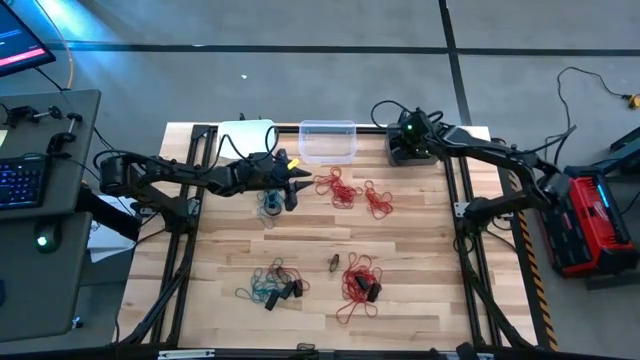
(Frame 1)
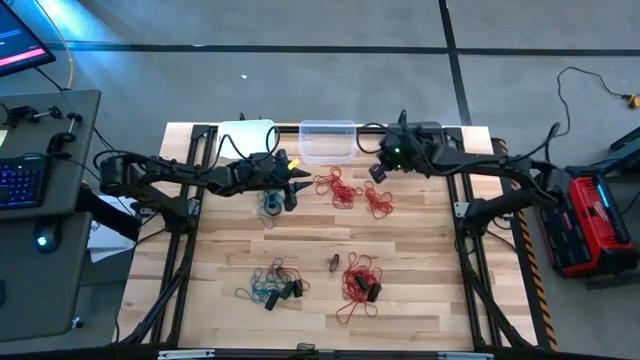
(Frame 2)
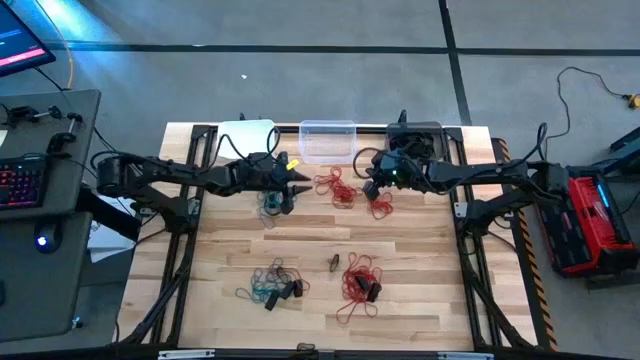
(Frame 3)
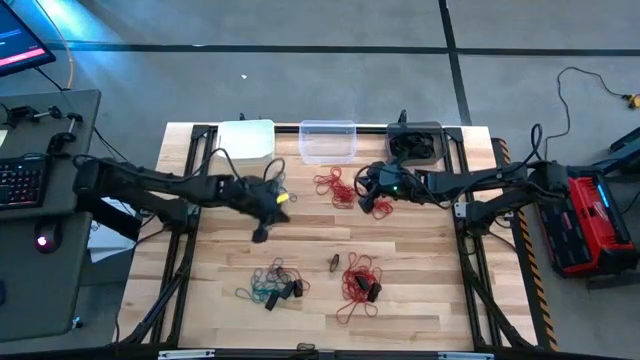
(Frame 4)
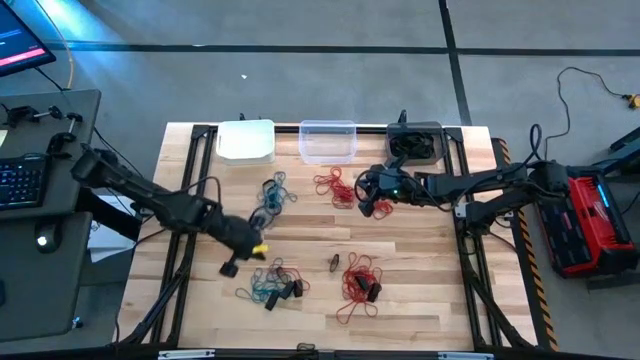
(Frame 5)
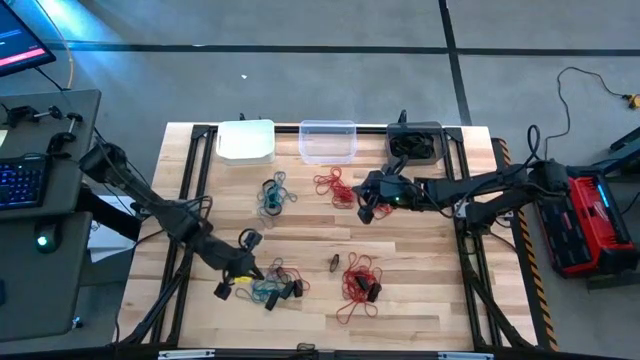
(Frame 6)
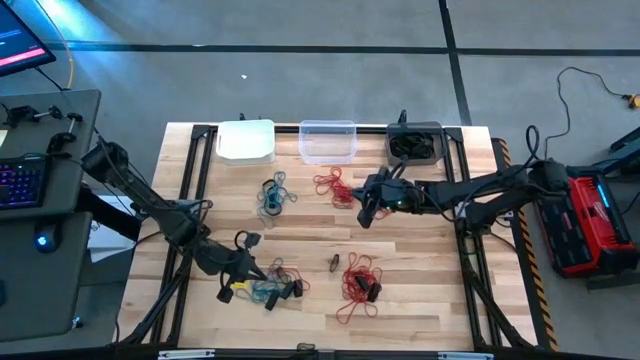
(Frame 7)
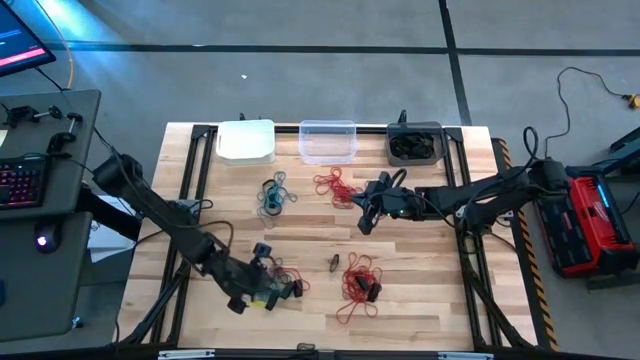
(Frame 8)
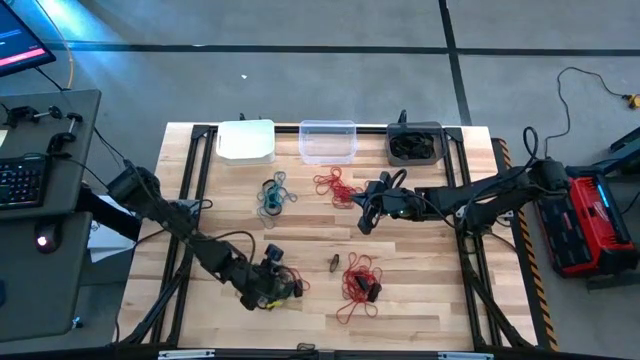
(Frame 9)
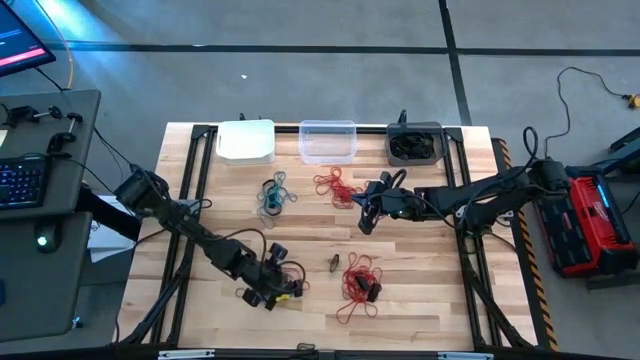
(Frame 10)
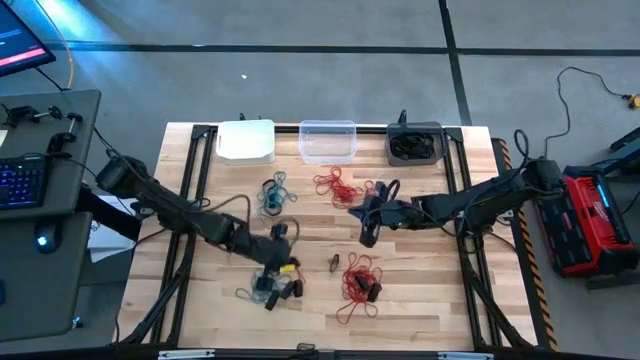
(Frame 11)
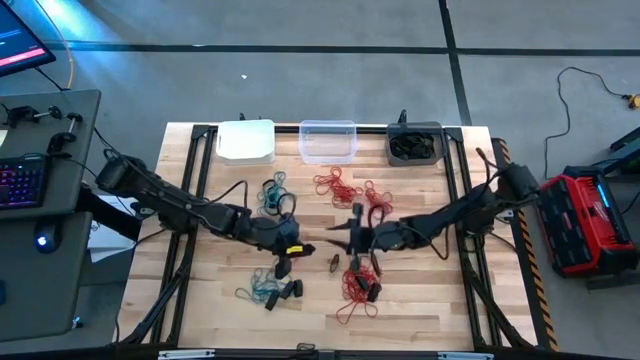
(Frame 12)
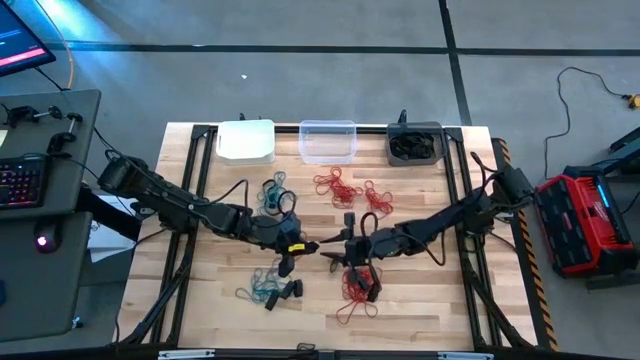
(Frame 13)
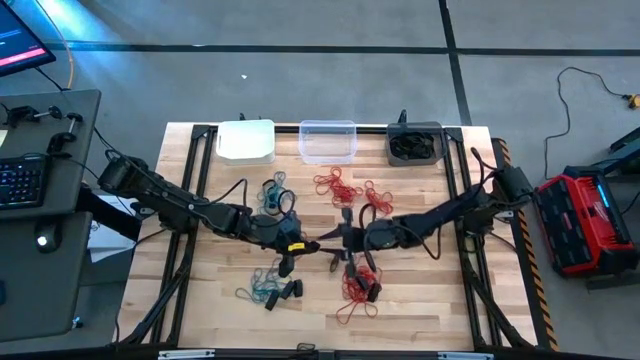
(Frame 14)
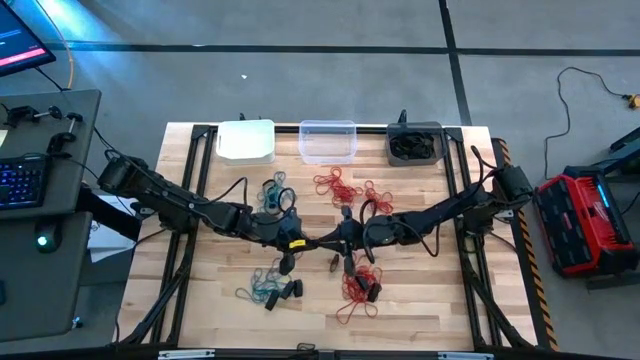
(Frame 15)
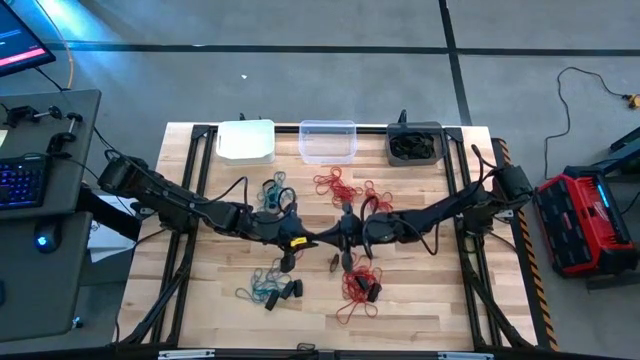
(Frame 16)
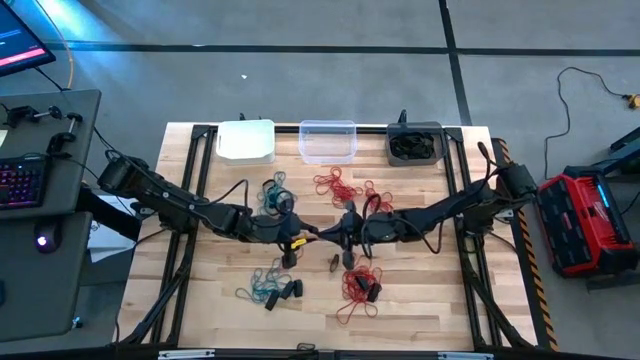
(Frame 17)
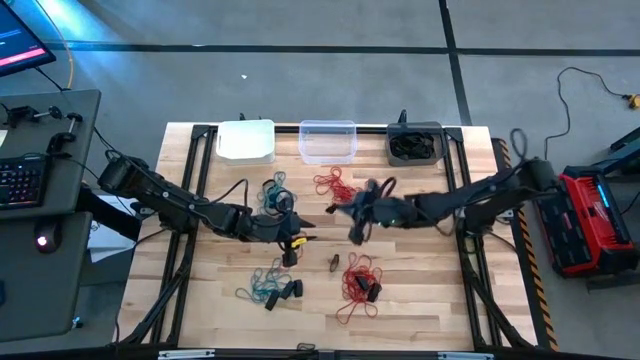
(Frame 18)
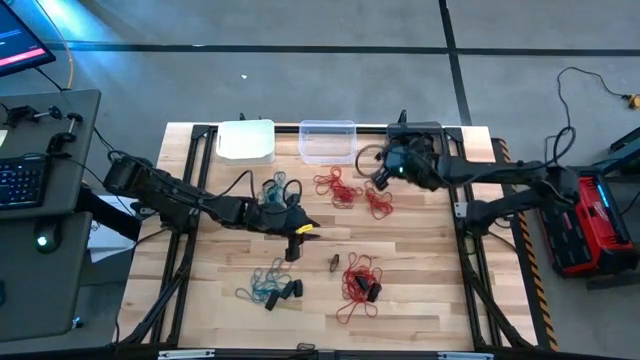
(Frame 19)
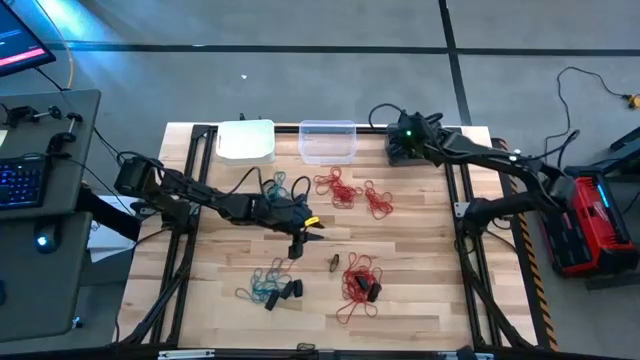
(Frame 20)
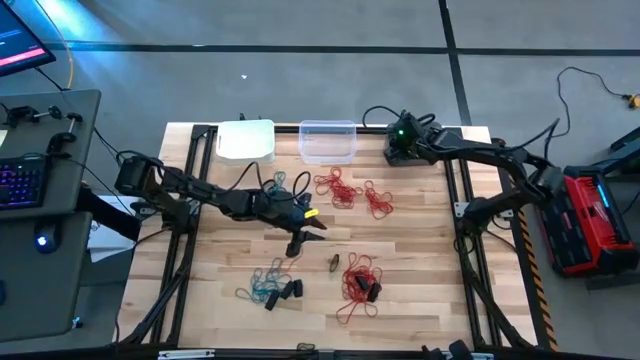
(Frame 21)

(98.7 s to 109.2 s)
Task: Sort rubber bands into baskets
Put the black rubber band into the black bin

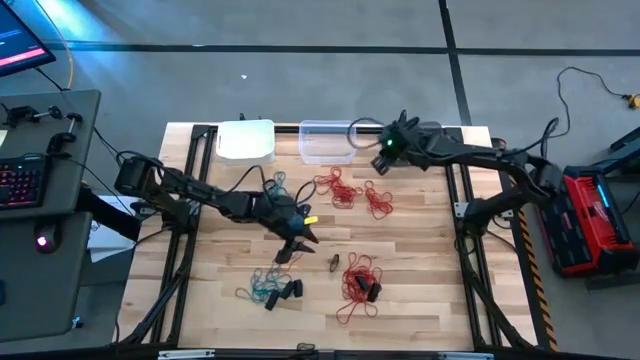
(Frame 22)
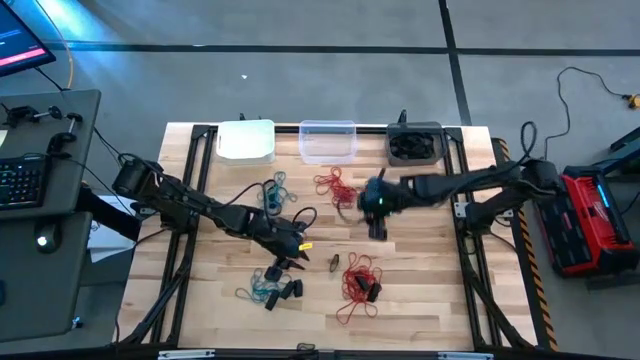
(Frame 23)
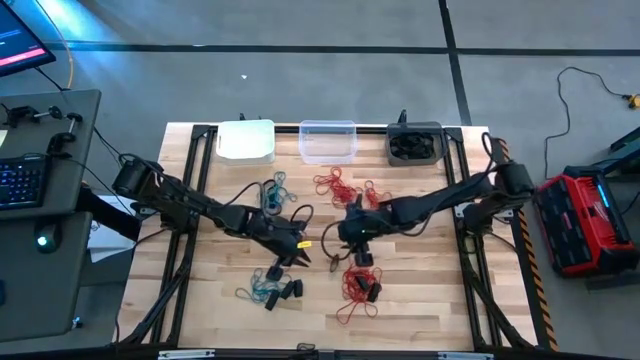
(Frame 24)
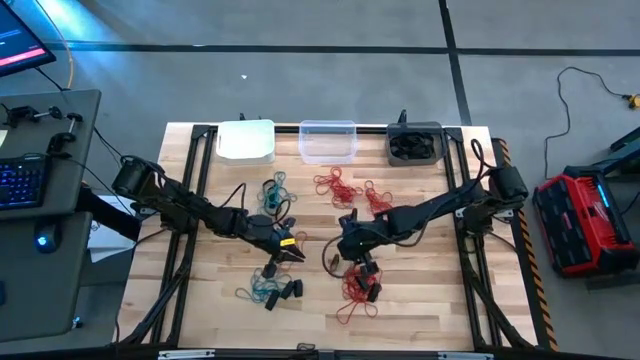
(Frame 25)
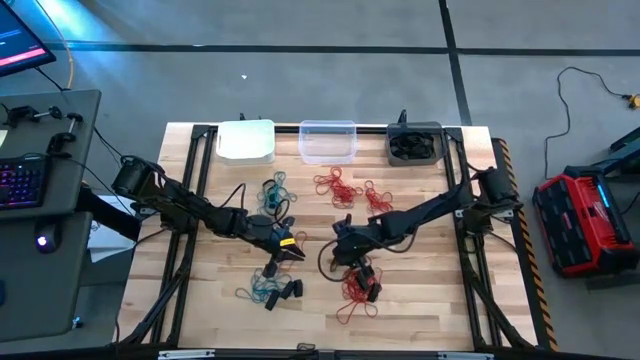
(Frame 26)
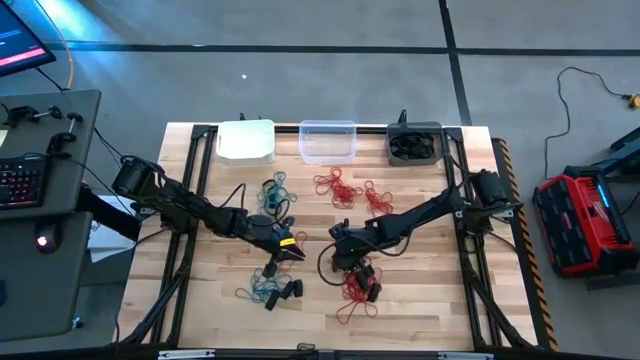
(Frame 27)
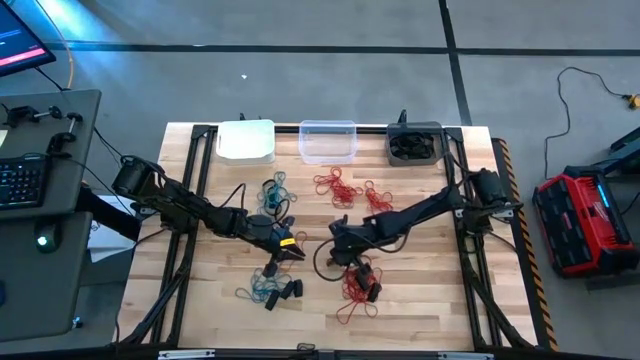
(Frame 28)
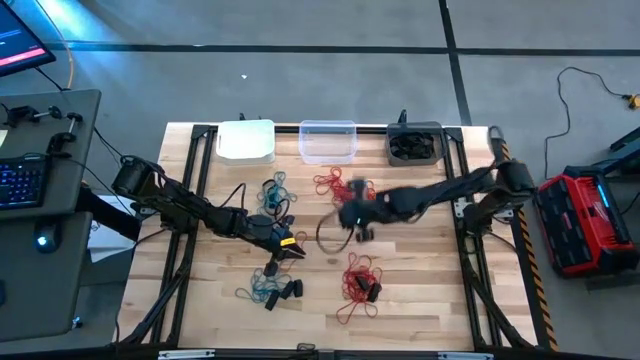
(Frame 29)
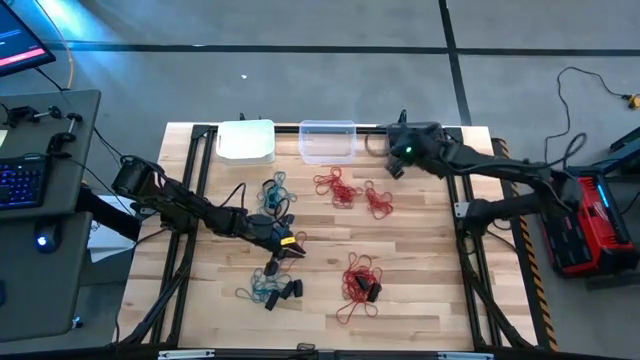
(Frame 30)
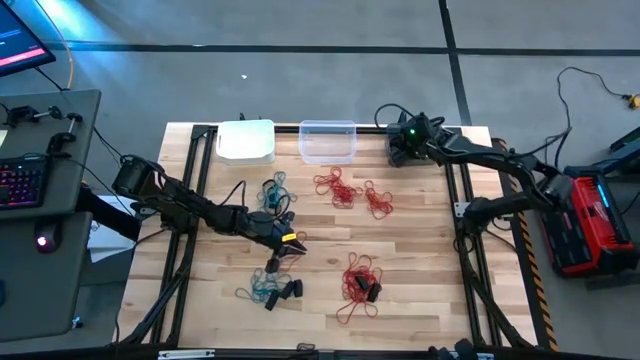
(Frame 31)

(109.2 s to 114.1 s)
Put the black rubber band into the black bin

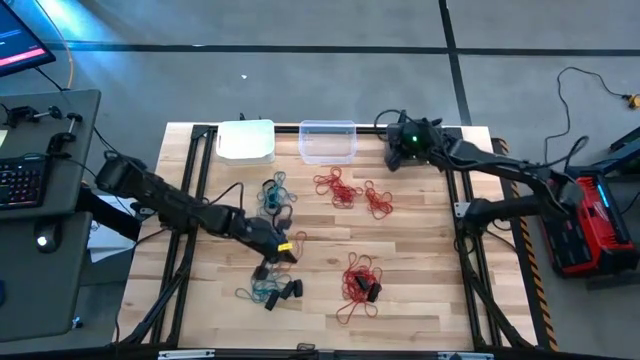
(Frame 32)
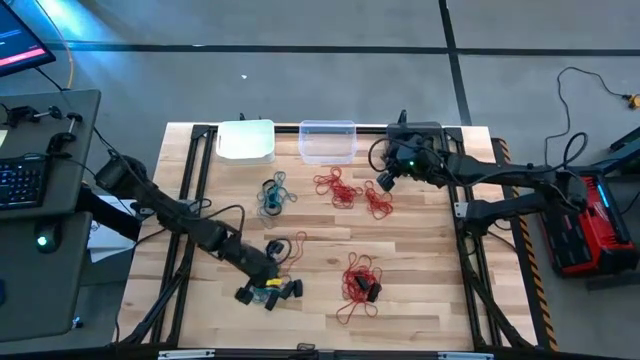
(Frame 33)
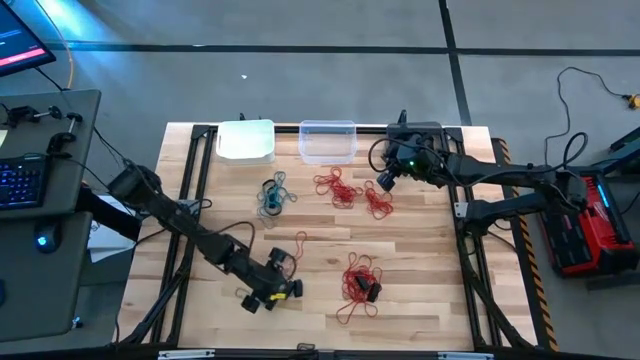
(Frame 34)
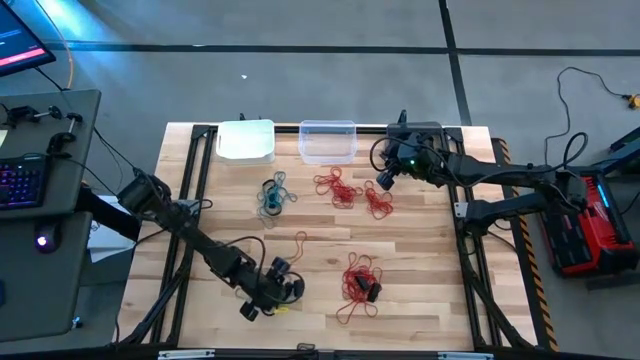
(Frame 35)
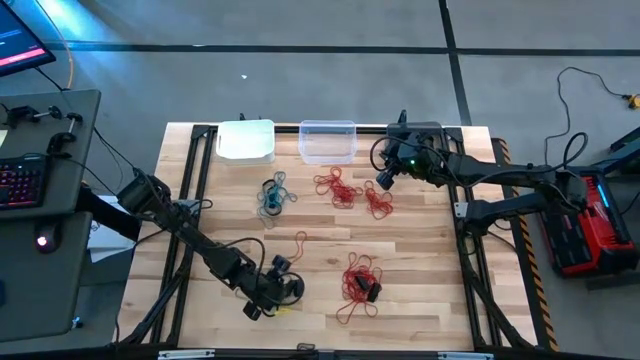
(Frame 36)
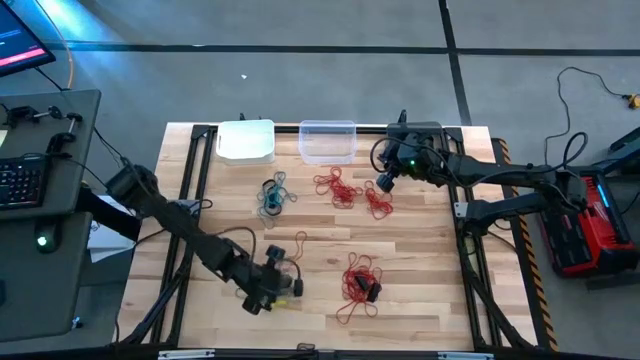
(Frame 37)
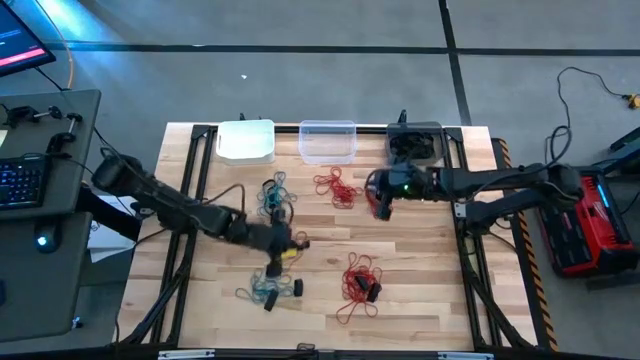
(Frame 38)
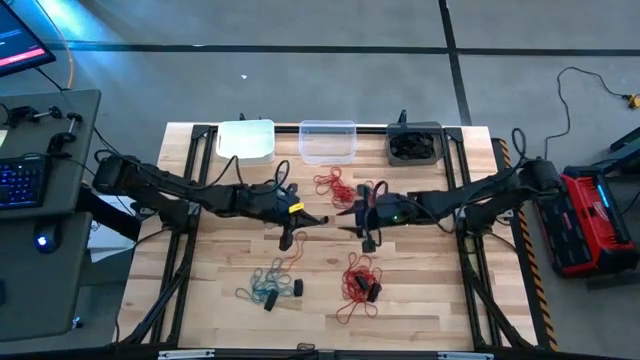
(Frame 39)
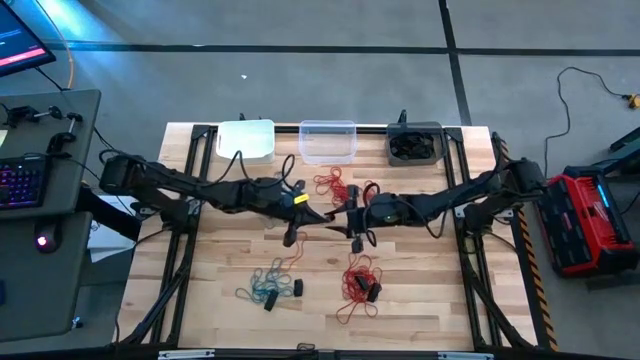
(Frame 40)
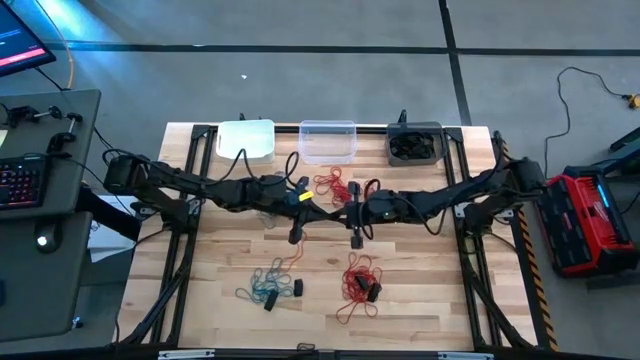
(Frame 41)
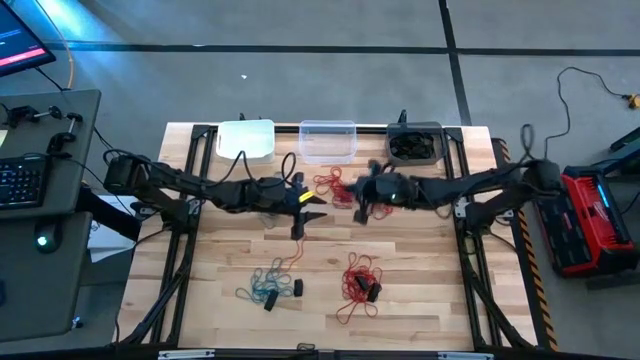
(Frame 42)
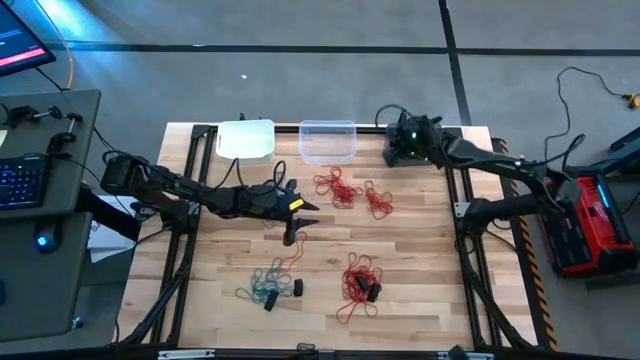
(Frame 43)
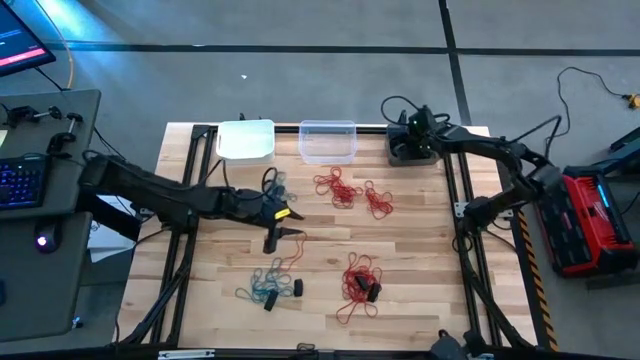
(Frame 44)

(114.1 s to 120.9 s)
Put the black rubber band into the black bin
